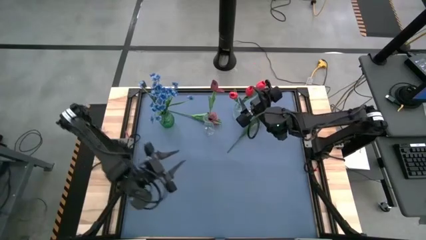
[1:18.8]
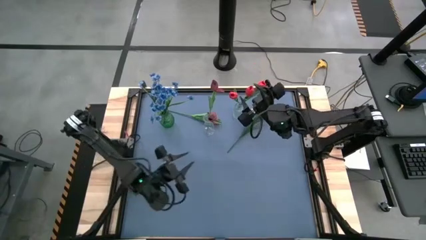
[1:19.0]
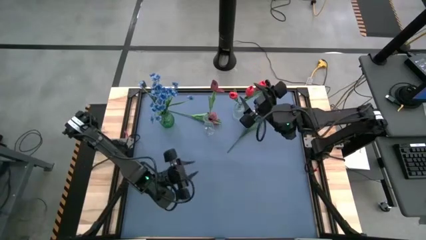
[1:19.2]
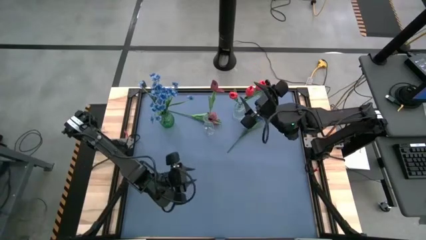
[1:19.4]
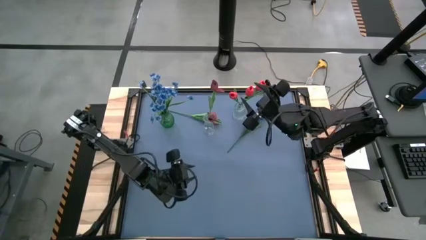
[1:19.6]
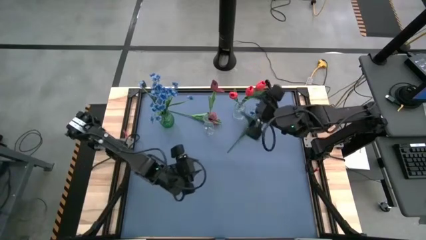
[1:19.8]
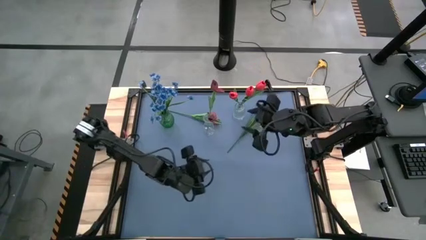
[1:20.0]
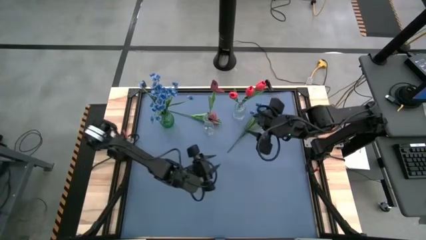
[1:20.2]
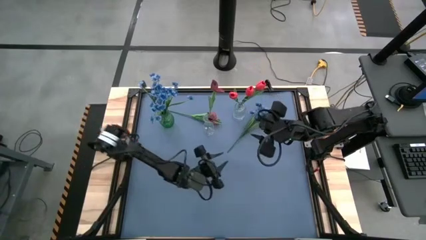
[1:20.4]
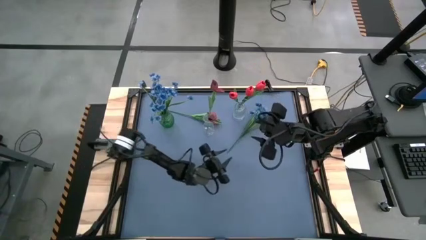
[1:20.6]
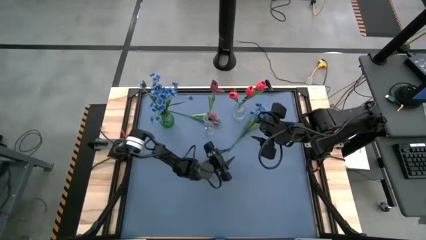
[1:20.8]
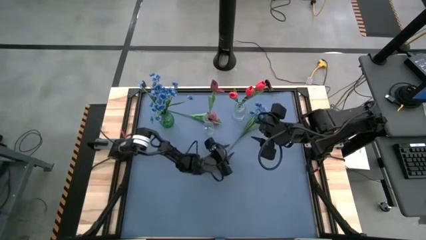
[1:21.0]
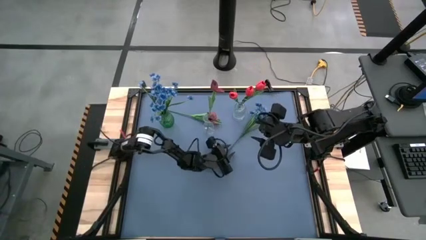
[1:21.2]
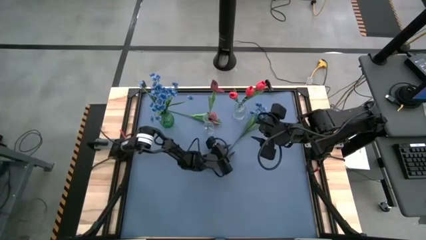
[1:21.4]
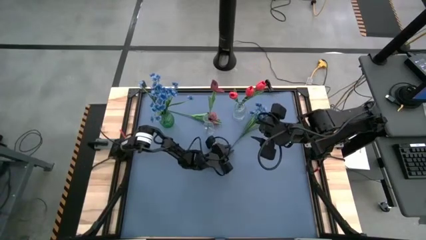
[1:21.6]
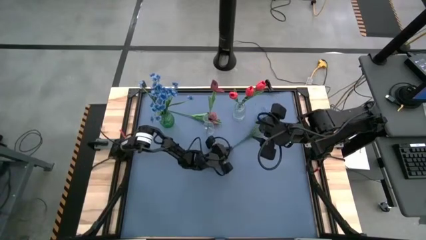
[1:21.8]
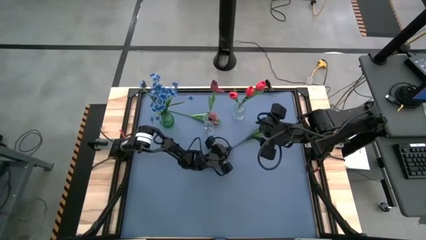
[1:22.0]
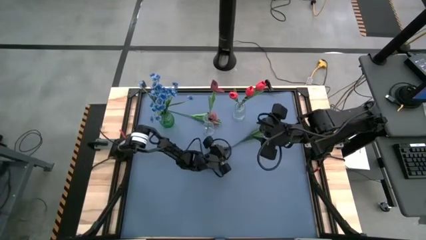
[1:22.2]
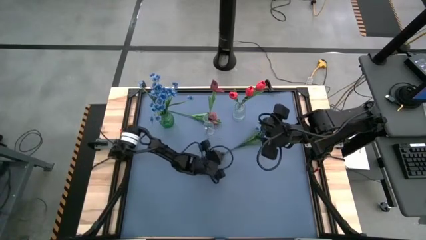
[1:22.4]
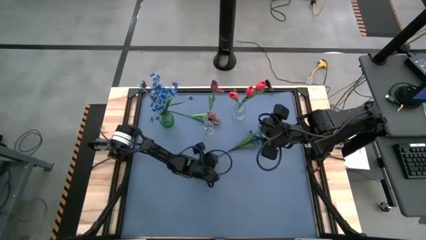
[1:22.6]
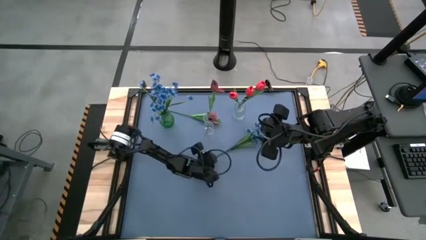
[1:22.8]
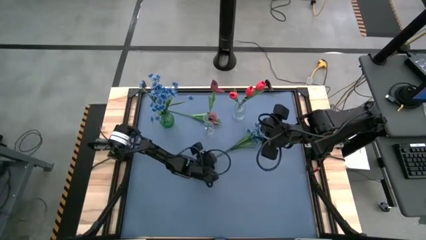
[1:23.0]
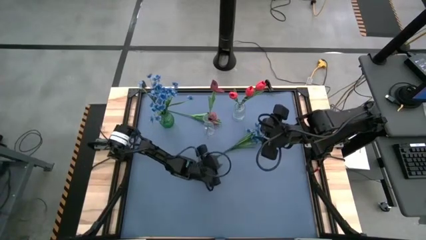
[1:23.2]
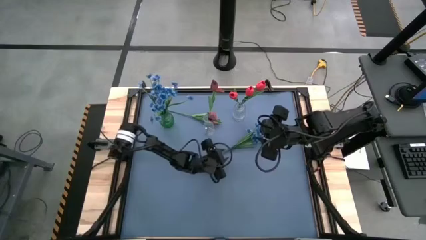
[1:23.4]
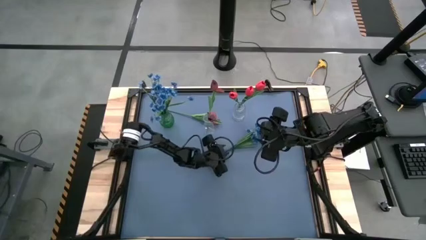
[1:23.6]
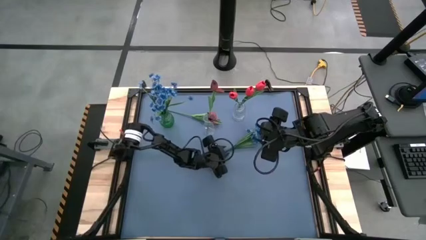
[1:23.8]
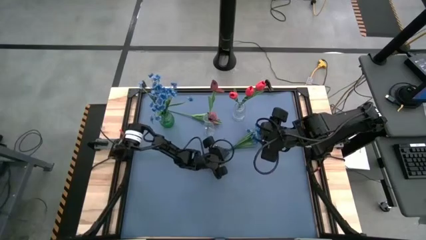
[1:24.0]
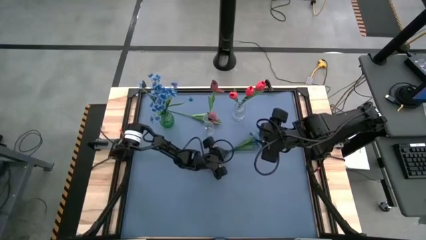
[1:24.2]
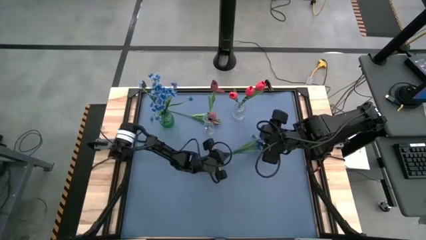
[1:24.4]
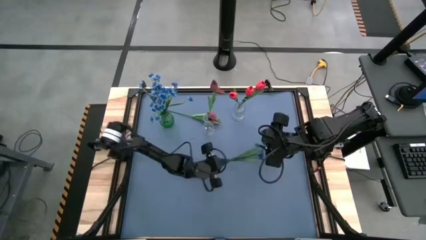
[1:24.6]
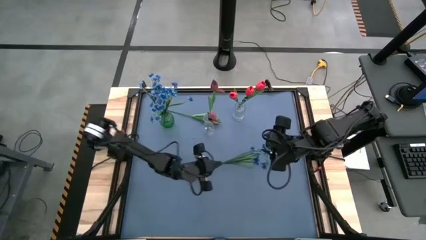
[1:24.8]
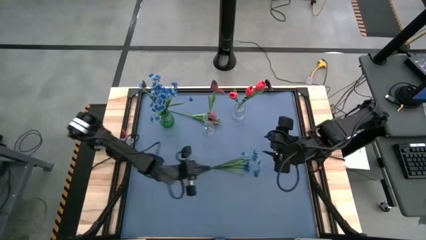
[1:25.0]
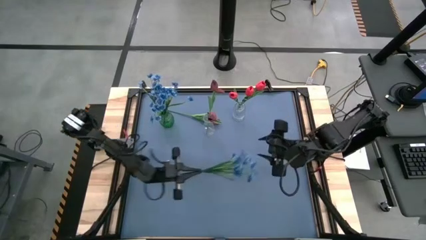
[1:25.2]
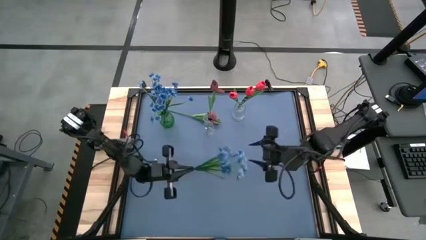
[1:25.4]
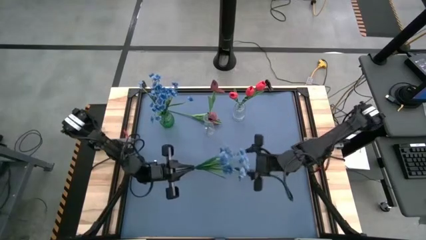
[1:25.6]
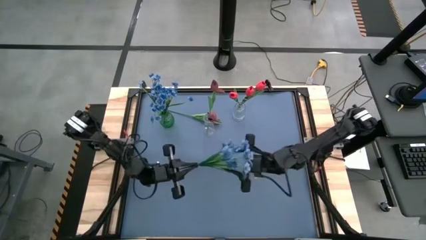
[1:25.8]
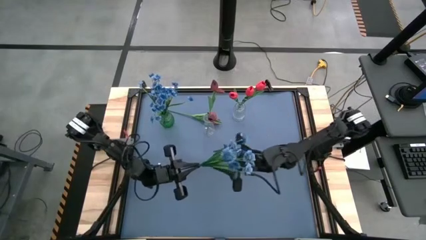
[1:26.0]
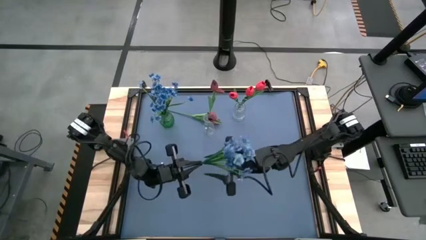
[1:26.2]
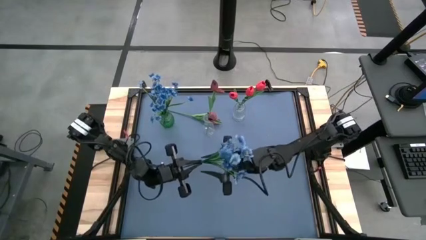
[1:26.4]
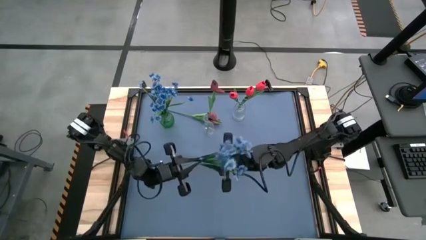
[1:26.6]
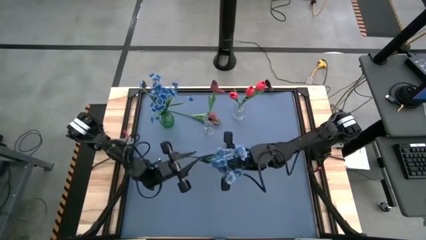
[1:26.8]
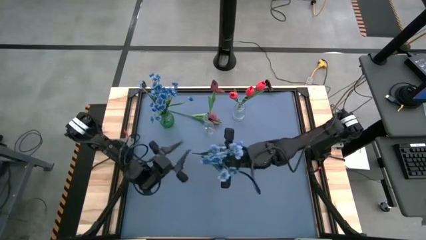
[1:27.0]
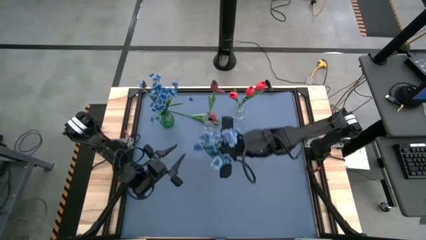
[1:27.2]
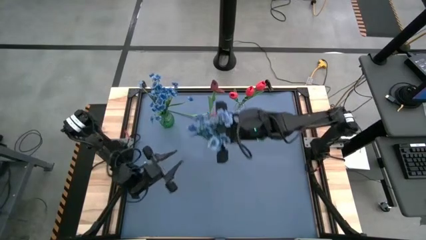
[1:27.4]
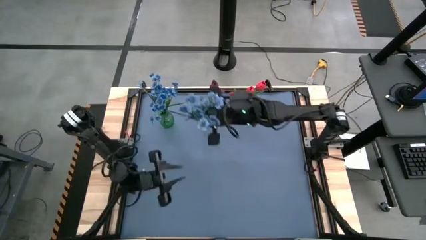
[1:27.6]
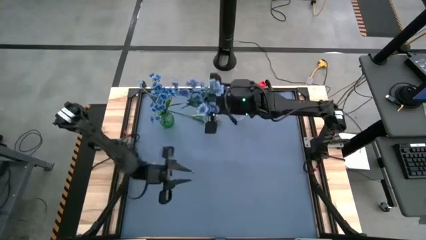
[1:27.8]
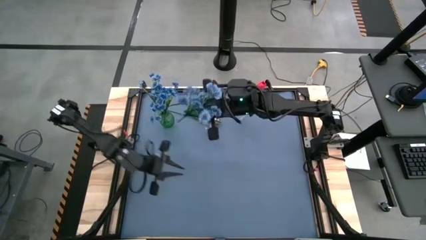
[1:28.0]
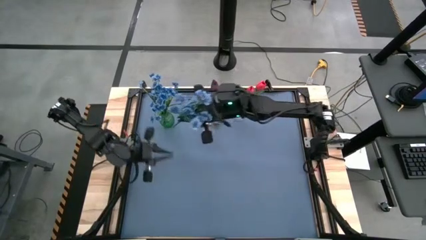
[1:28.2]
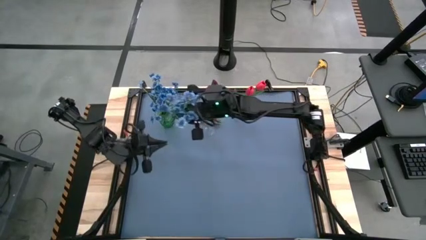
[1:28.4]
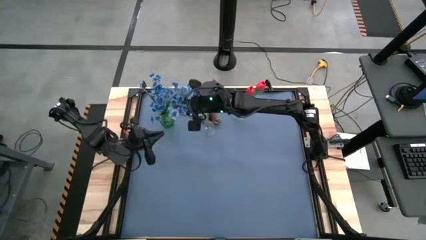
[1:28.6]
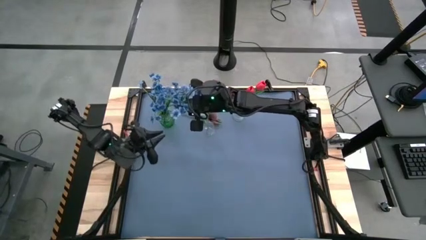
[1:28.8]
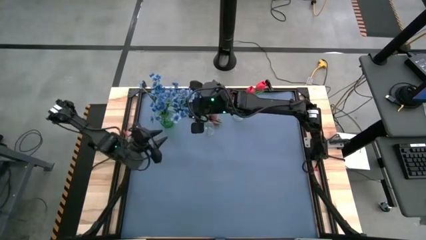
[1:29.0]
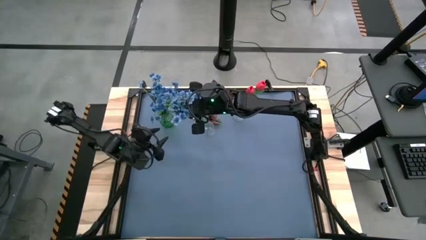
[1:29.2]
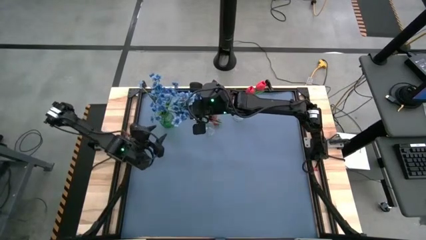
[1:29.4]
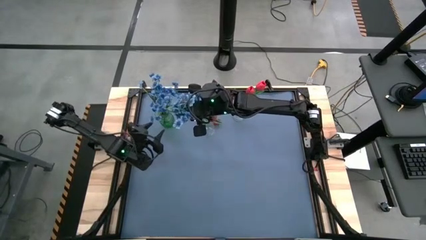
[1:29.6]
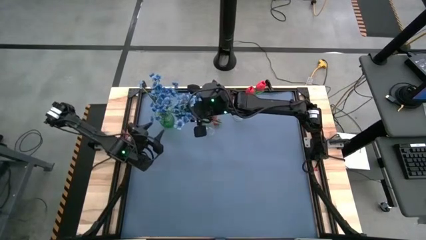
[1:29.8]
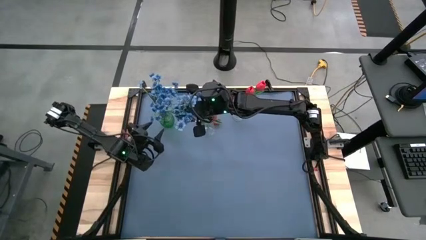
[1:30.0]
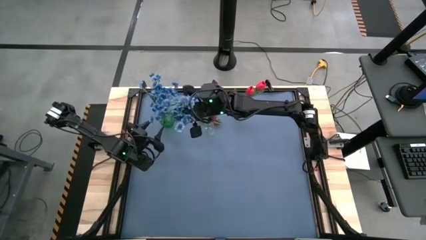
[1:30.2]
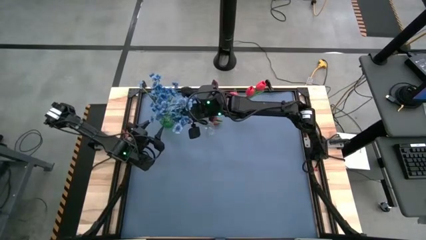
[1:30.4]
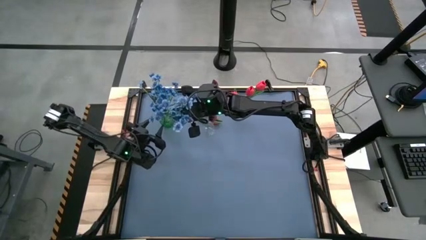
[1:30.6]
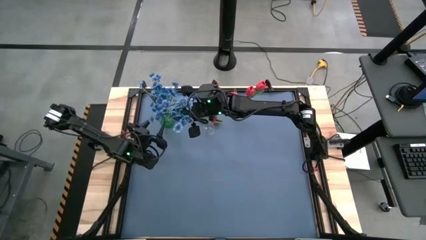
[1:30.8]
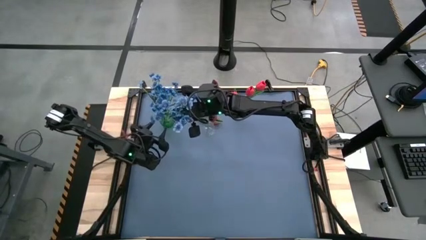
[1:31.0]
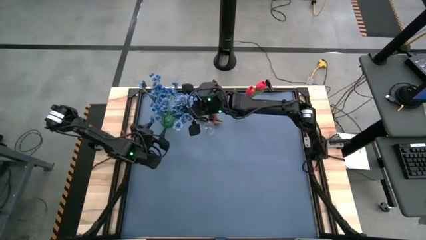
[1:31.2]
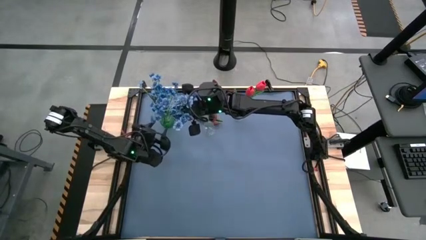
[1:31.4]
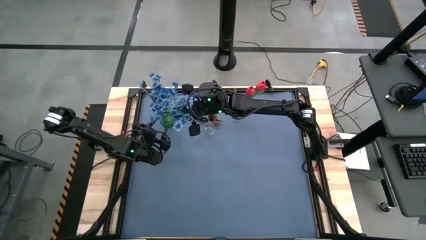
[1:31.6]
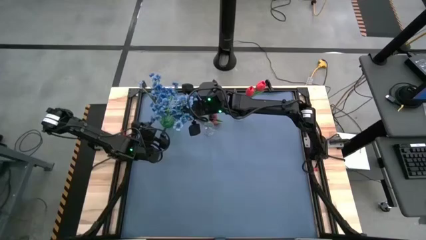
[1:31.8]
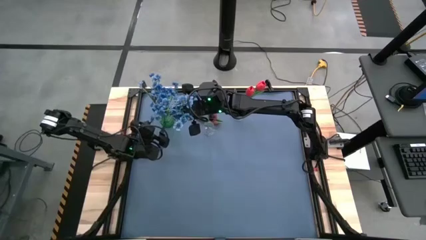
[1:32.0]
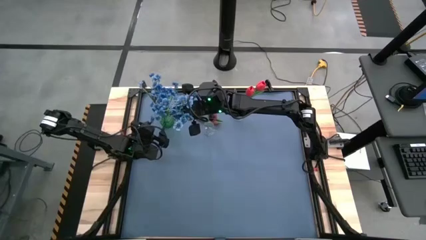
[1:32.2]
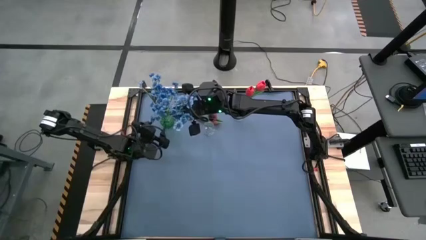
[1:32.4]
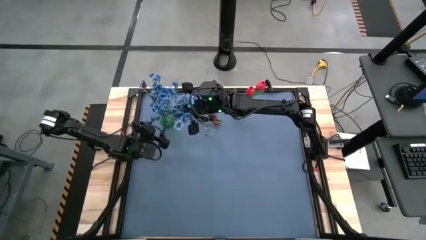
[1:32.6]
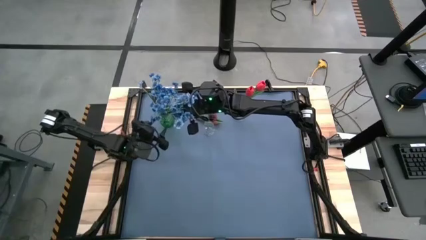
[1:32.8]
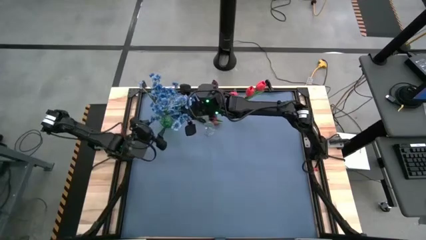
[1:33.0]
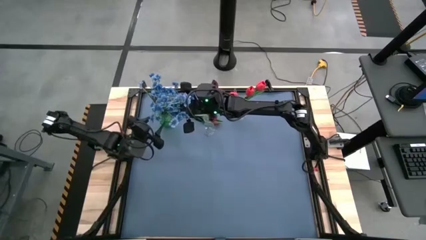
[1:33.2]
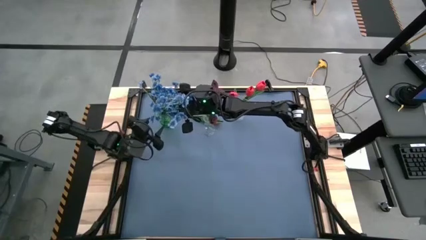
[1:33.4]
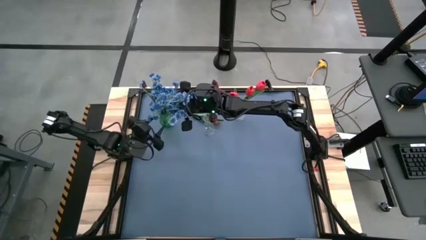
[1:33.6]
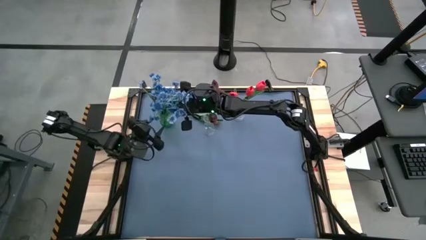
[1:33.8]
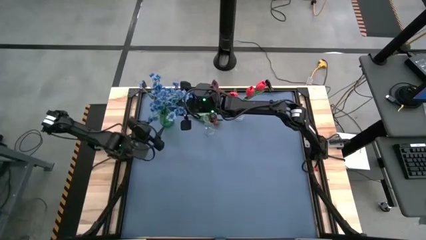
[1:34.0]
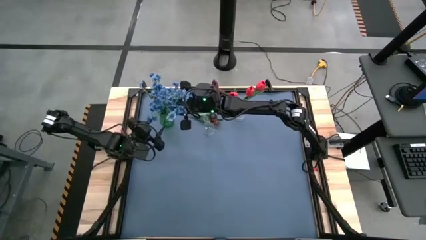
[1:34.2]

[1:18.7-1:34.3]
Task: Sort flowers into vase by color
Put the blue flowers into the green vase
